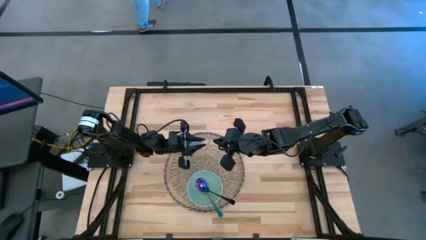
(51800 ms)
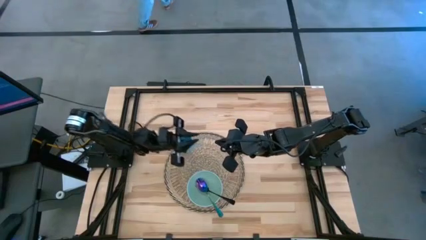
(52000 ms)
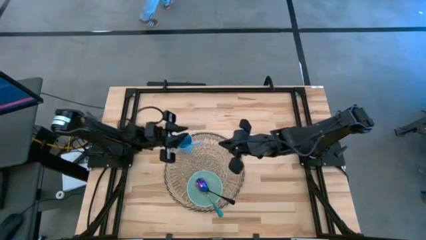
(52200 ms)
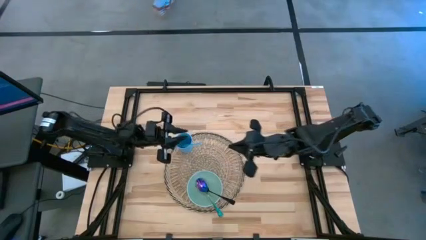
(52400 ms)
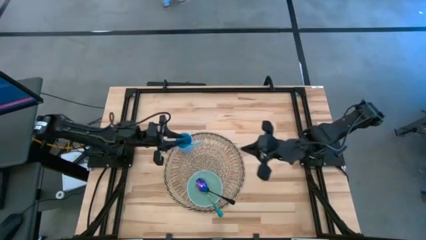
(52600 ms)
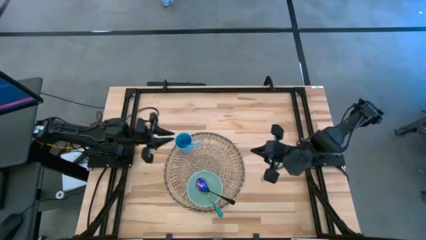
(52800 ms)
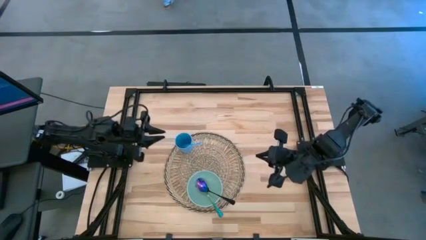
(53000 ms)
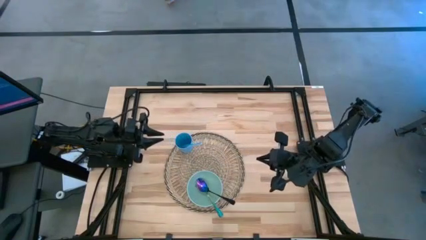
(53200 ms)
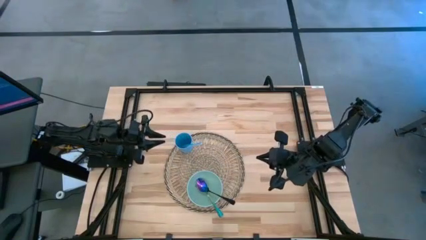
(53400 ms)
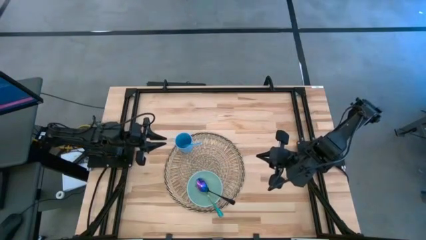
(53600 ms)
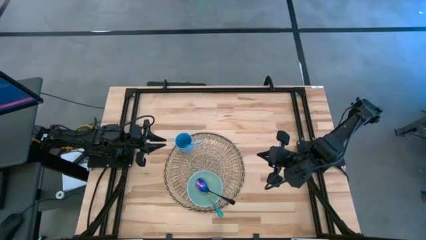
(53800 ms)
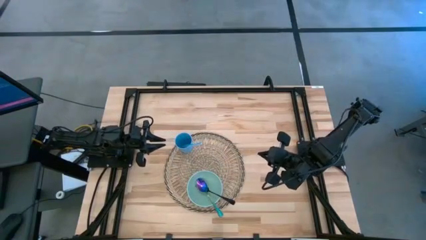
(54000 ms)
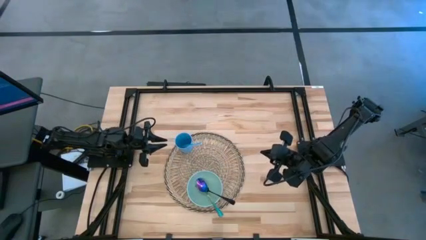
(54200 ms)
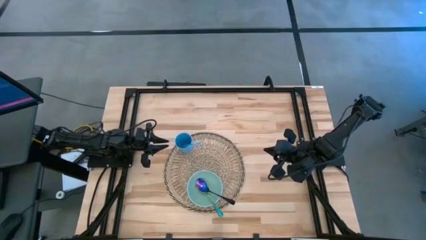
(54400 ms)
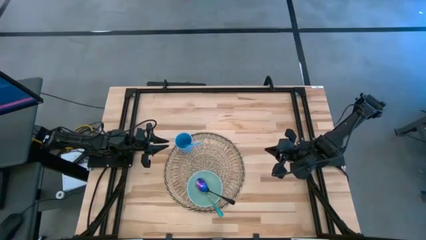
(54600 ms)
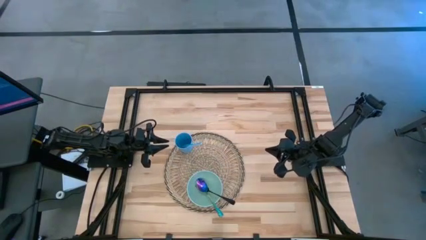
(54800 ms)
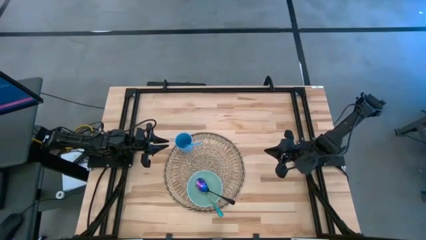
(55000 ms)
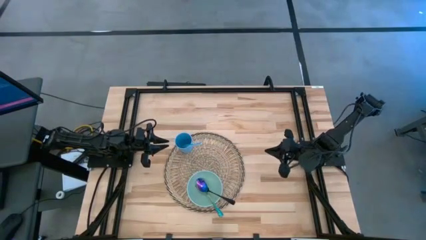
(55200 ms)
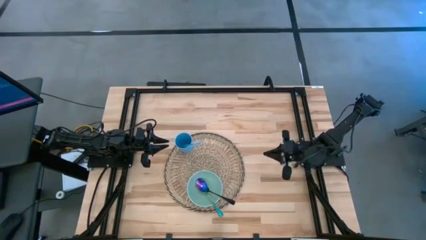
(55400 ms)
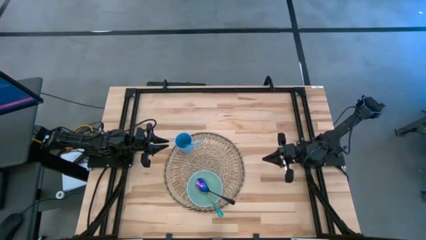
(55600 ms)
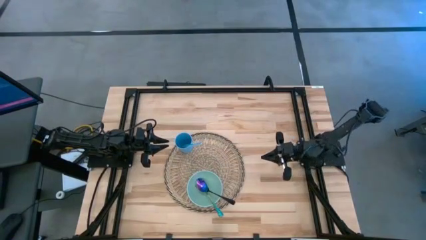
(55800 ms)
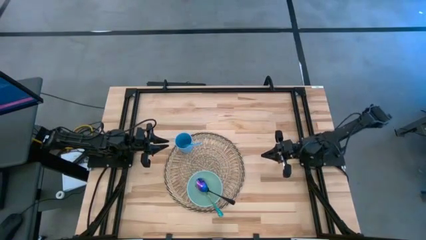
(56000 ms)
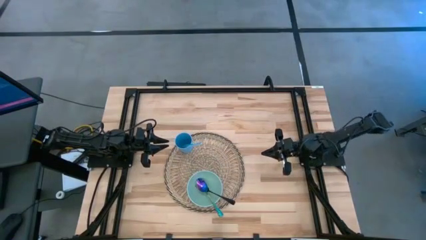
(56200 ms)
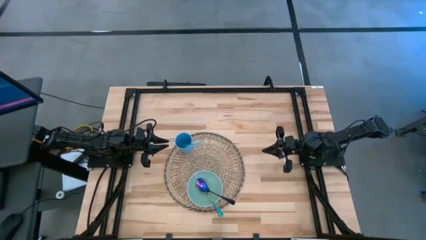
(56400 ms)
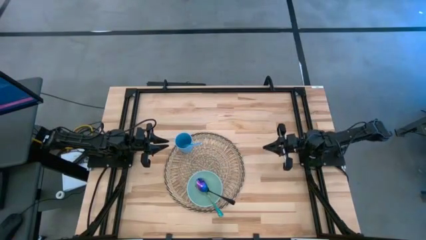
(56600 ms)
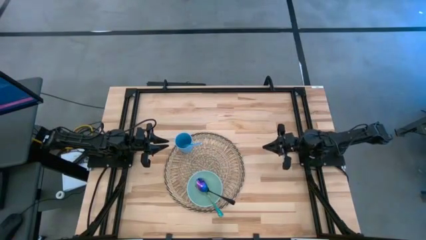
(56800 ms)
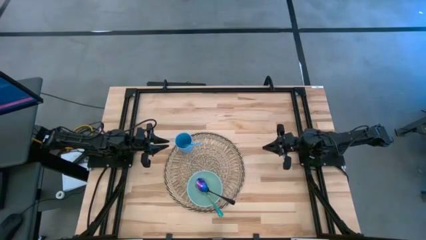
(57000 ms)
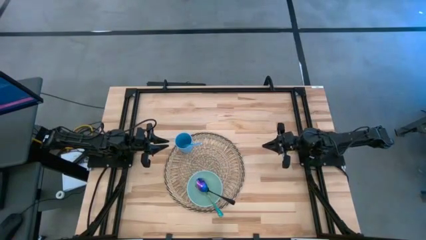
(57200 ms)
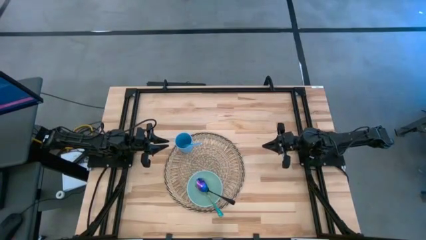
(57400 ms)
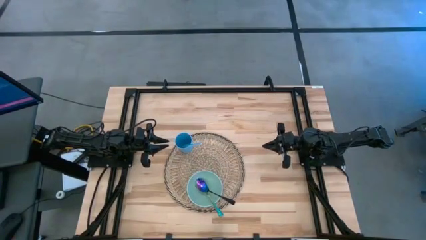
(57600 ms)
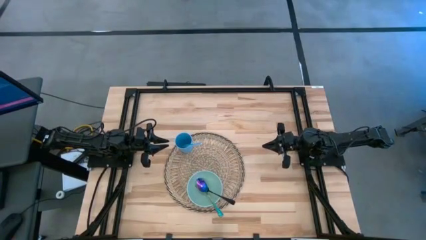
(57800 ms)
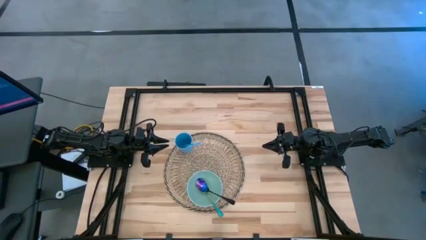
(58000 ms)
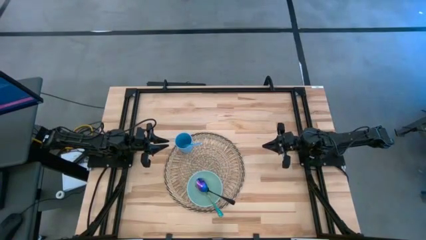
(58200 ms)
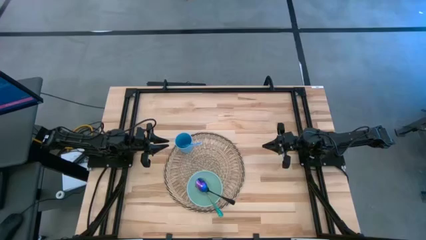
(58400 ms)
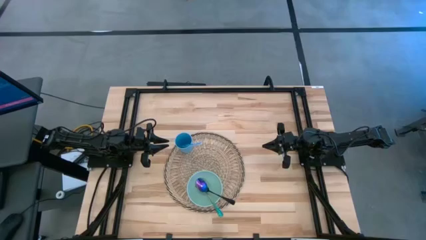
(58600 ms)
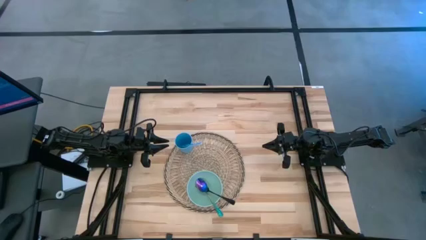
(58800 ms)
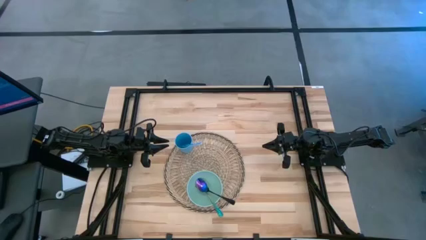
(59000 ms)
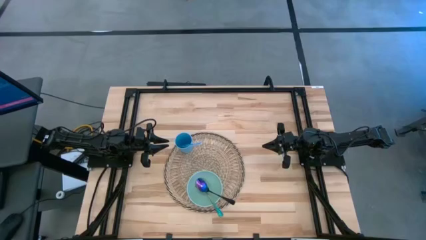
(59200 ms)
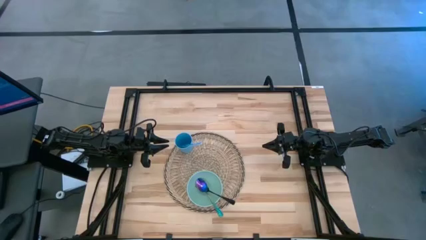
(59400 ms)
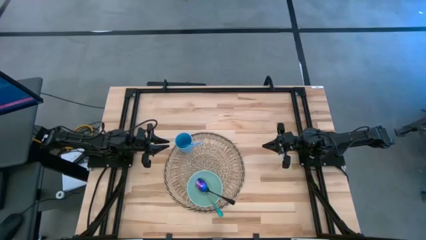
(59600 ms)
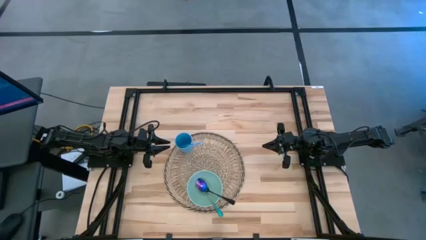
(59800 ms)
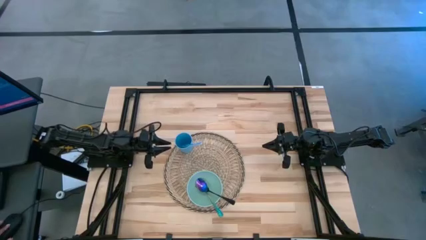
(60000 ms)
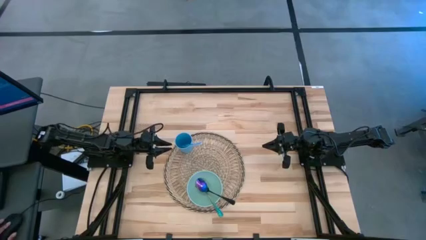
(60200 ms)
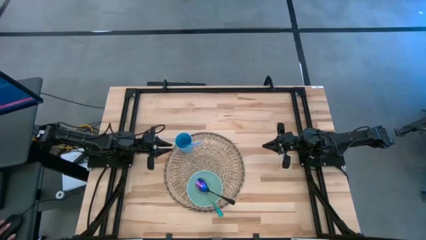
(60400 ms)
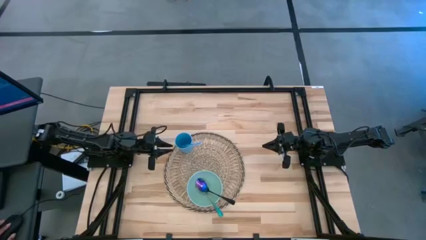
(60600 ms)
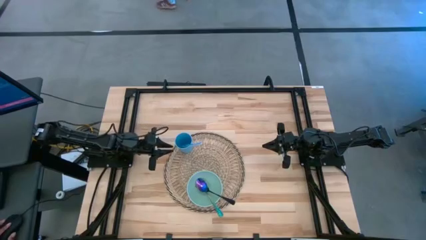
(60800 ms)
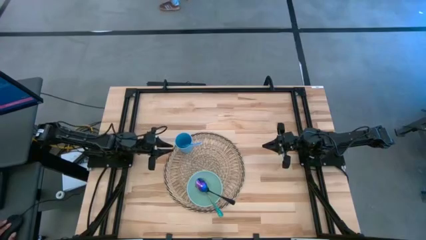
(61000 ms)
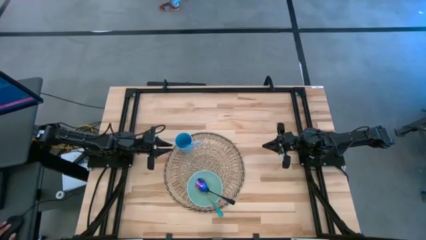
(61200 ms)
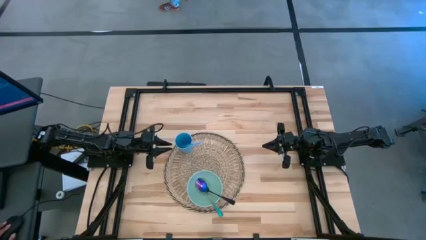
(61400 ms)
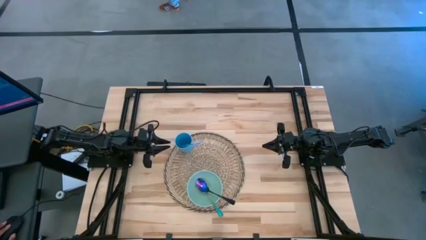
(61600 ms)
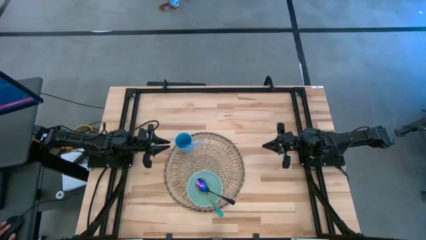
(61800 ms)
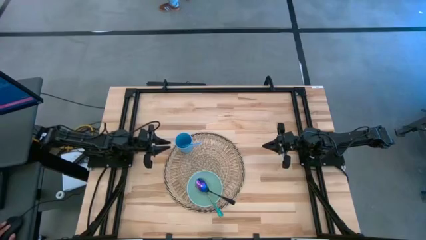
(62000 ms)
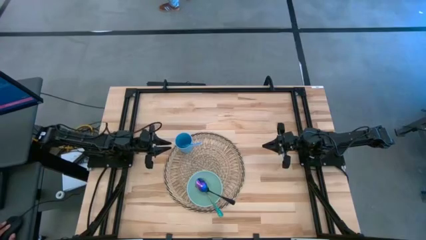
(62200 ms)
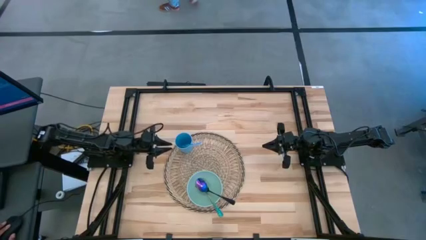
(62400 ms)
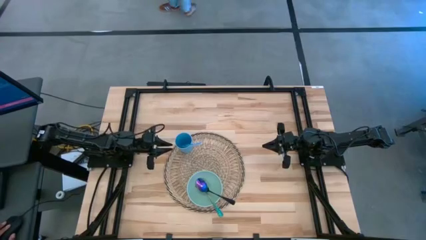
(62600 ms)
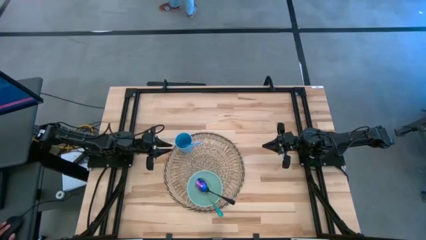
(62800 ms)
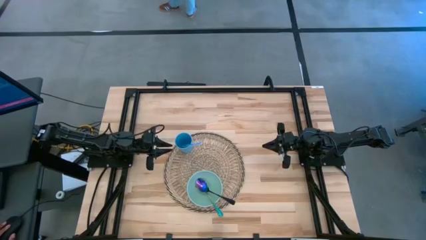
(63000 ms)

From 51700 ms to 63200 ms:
Task: Pick & Place Utensil
Return to Home Position

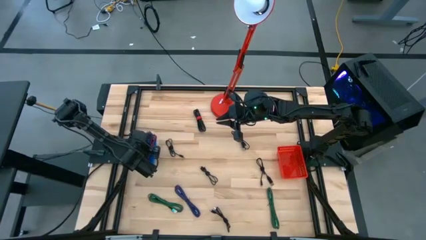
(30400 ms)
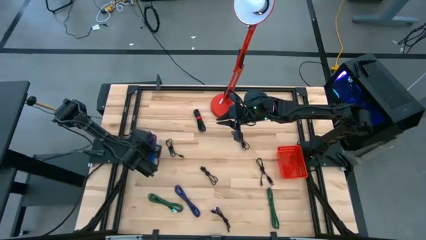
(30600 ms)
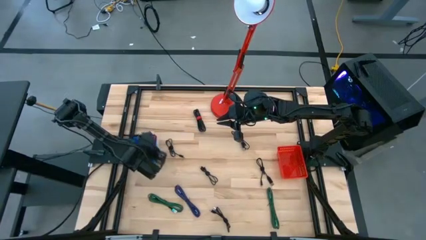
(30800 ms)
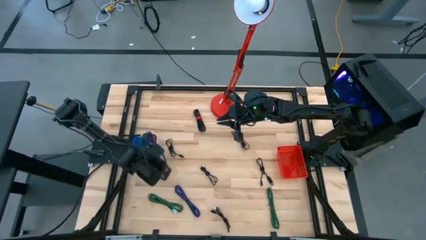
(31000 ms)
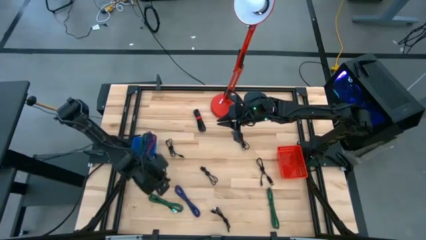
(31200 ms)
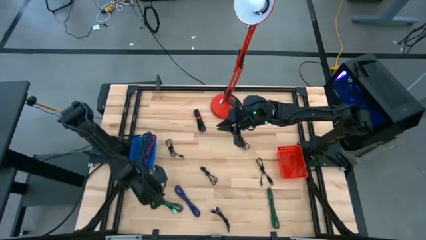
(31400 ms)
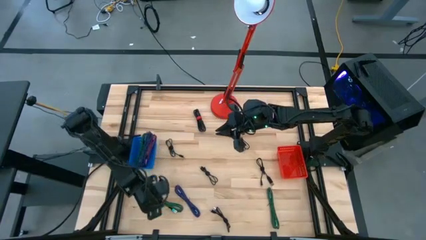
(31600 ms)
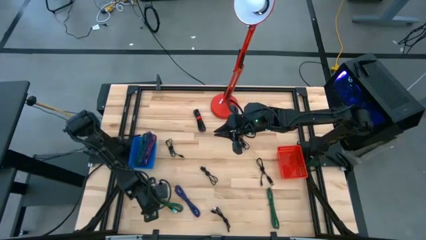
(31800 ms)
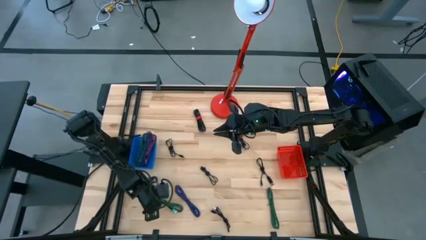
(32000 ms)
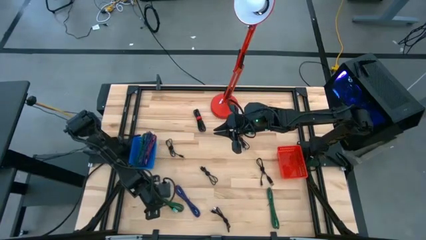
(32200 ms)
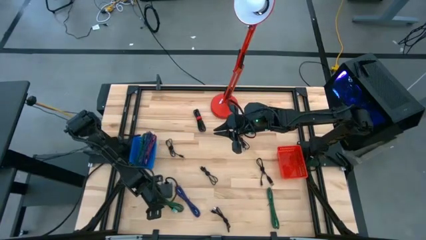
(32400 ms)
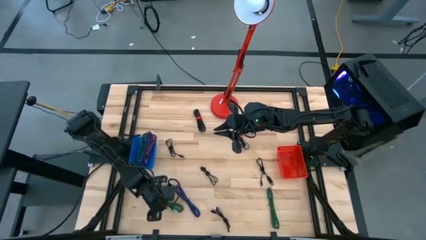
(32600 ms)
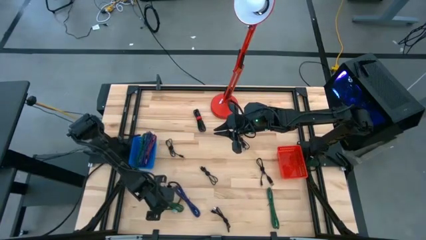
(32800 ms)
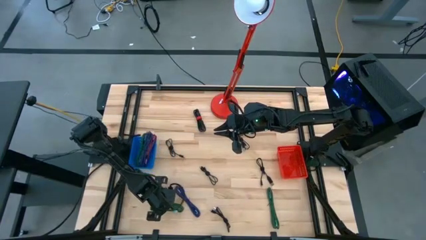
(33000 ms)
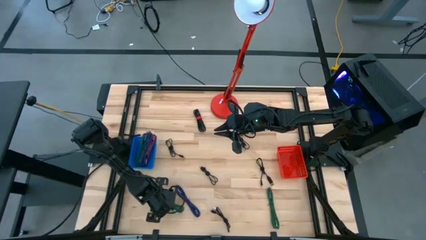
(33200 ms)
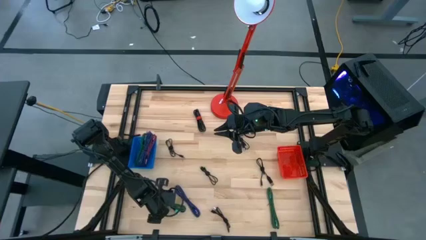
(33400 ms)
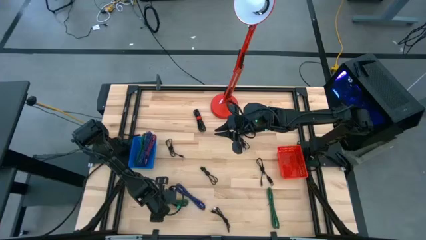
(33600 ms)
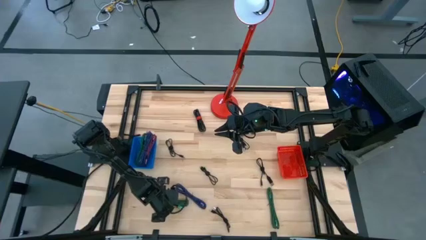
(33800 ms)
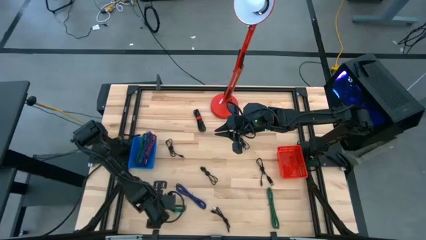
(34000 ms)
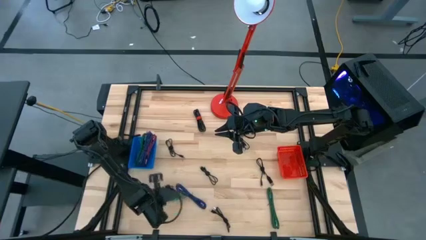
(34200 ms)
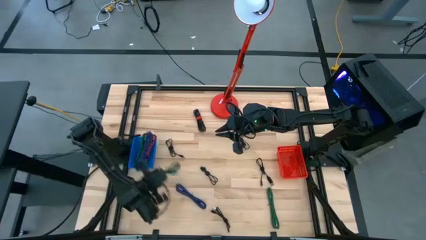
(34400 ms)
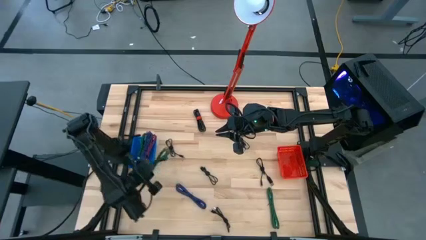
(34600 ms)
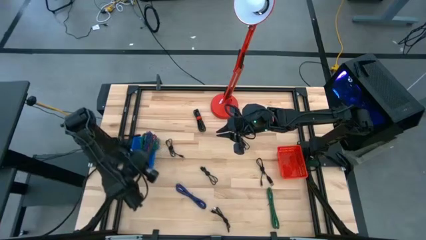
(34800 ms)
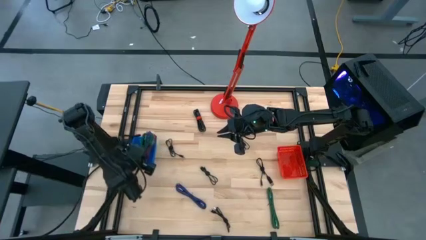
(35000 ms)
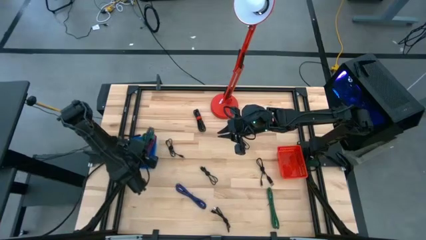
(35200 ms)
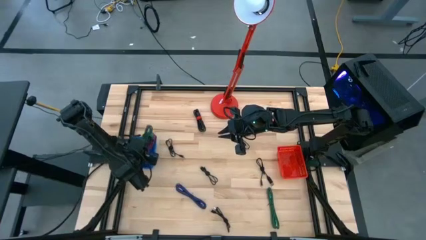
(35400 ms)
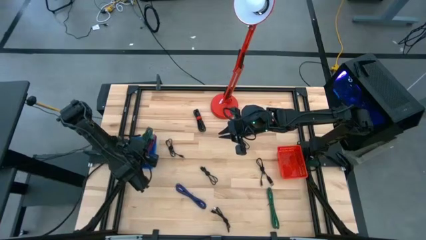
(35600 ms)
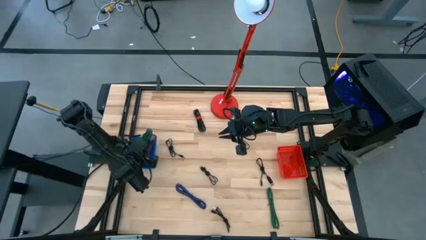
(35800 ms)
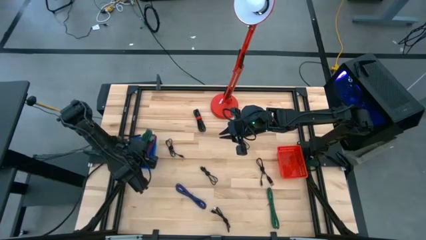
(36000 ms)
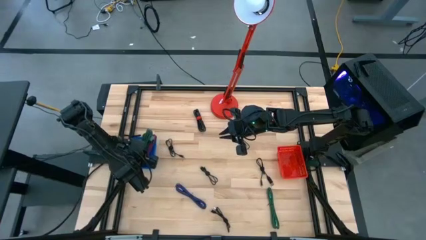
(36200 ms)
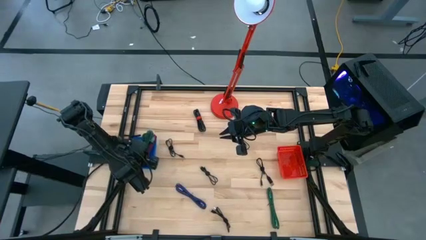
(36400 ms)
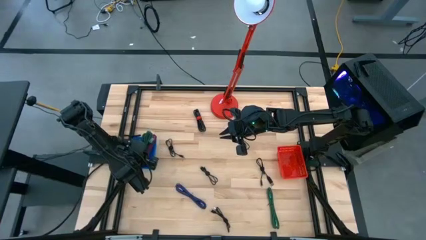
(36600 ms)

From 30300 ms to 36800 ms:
Task: Pick & Place USB Port
Put the green and black charger cable into the blue bin
